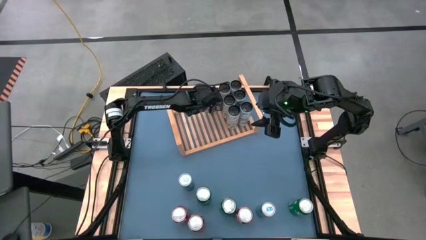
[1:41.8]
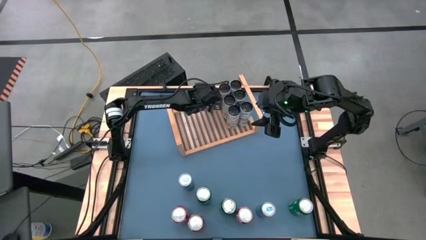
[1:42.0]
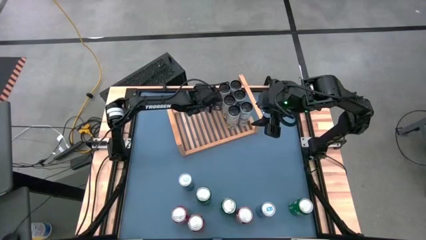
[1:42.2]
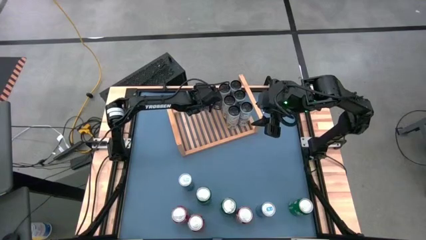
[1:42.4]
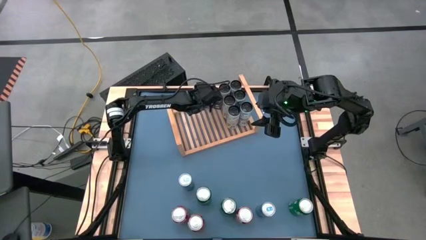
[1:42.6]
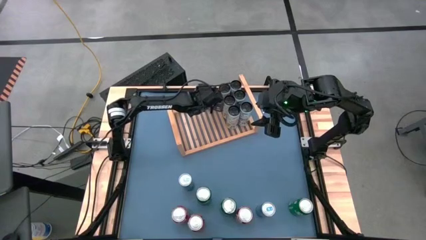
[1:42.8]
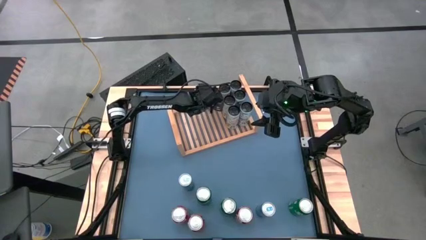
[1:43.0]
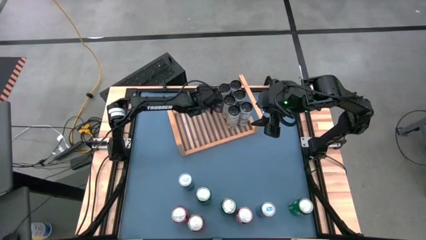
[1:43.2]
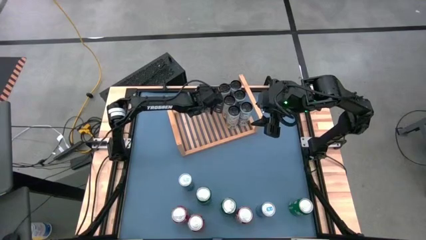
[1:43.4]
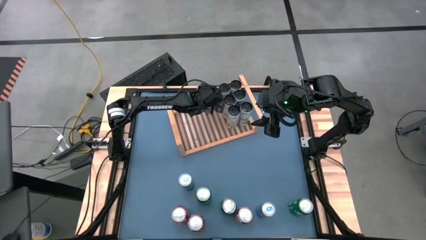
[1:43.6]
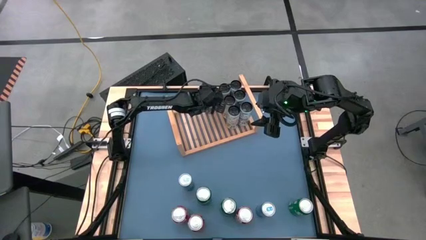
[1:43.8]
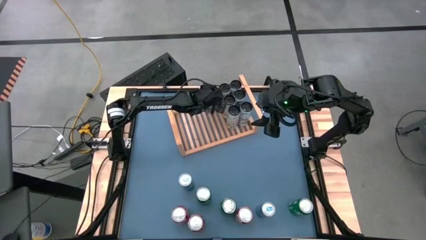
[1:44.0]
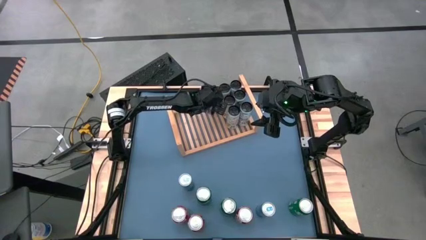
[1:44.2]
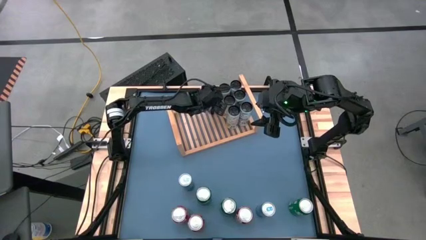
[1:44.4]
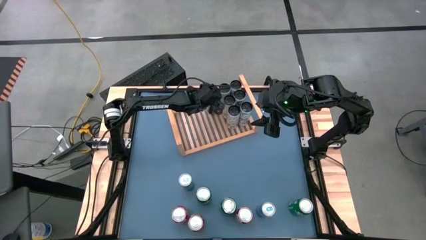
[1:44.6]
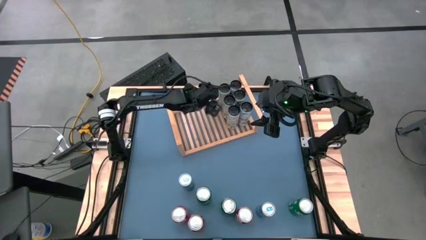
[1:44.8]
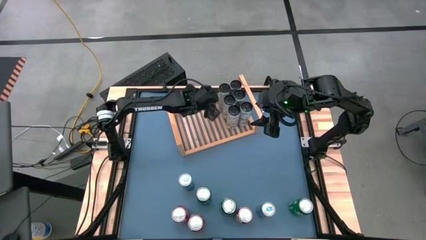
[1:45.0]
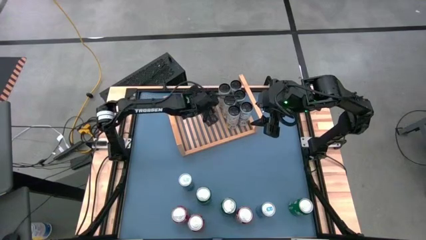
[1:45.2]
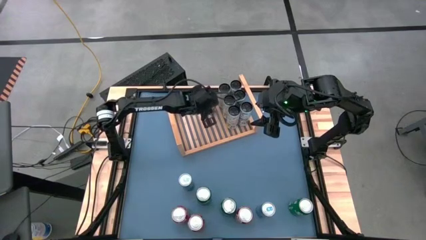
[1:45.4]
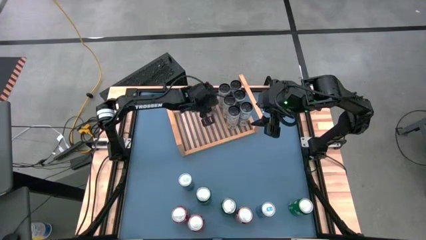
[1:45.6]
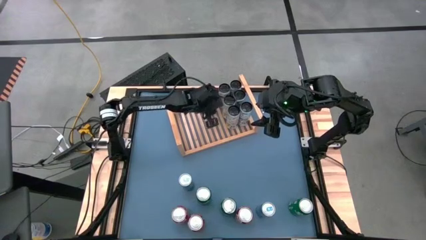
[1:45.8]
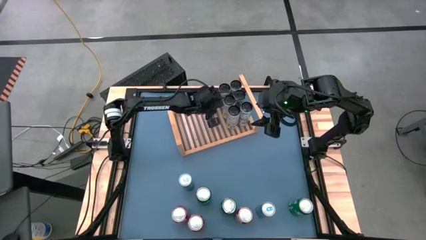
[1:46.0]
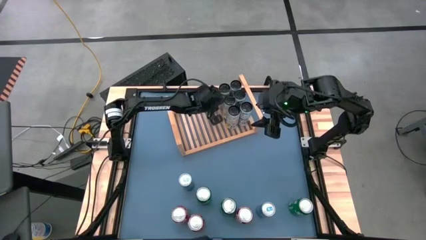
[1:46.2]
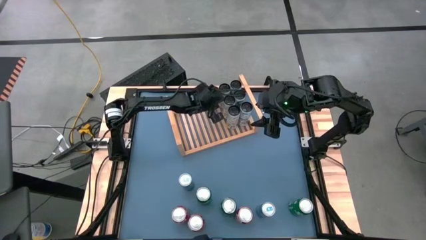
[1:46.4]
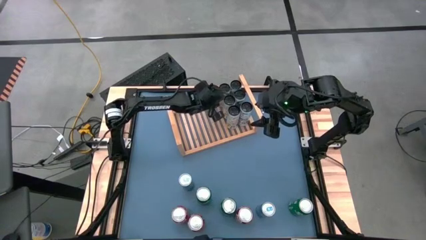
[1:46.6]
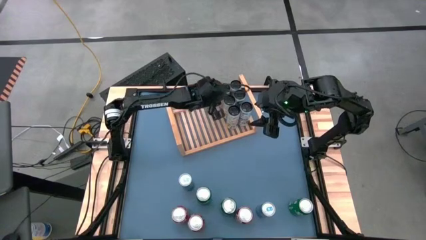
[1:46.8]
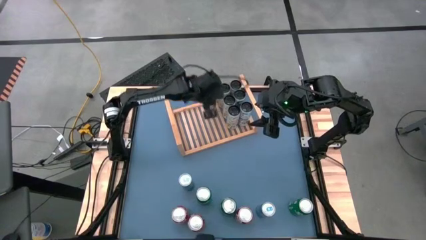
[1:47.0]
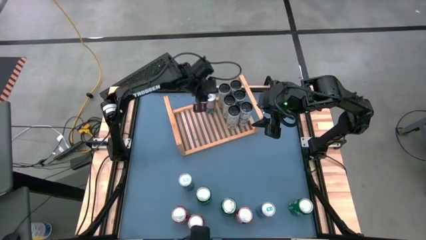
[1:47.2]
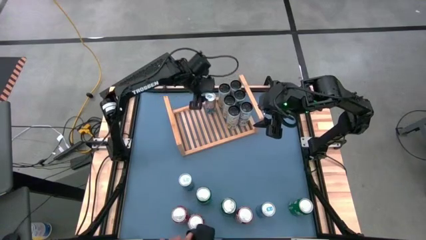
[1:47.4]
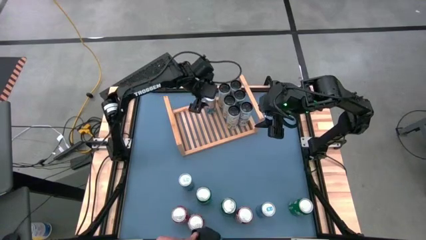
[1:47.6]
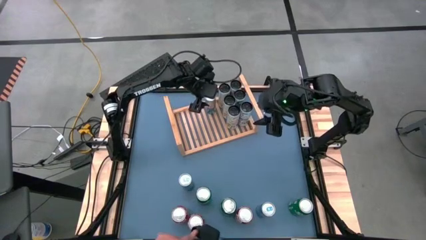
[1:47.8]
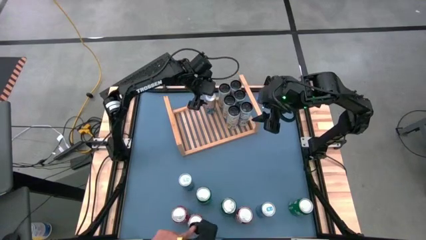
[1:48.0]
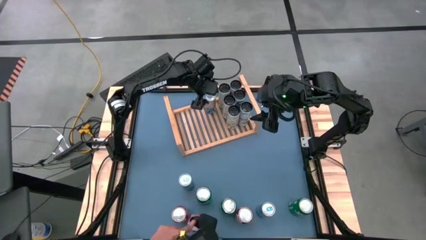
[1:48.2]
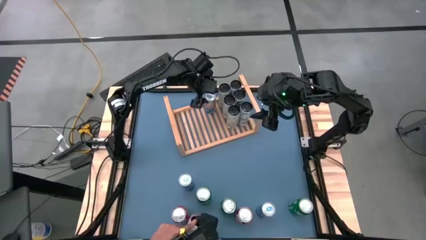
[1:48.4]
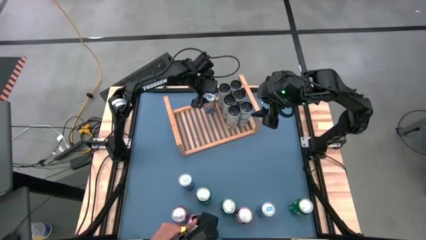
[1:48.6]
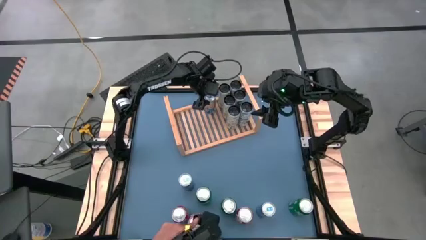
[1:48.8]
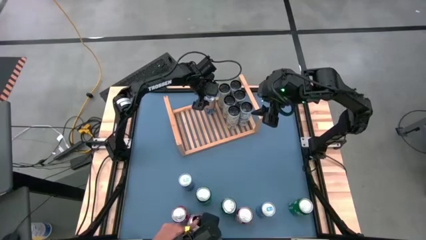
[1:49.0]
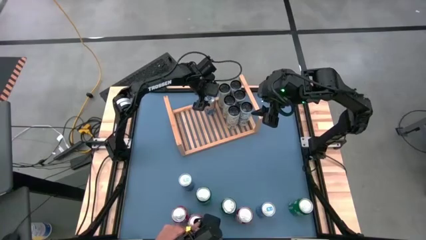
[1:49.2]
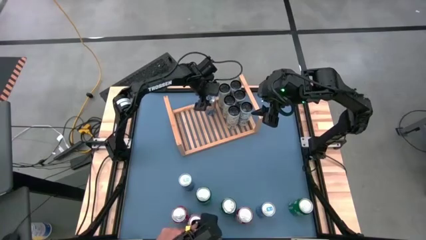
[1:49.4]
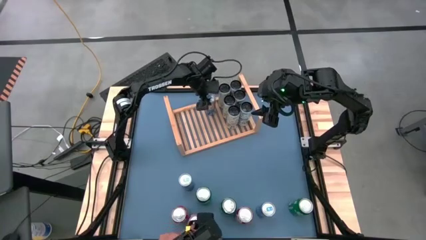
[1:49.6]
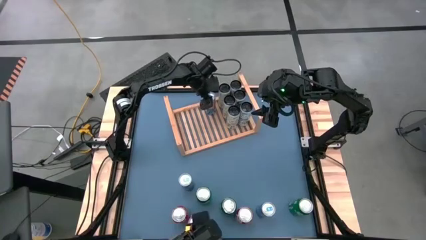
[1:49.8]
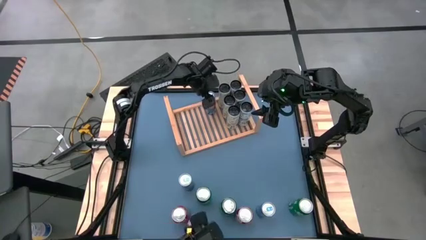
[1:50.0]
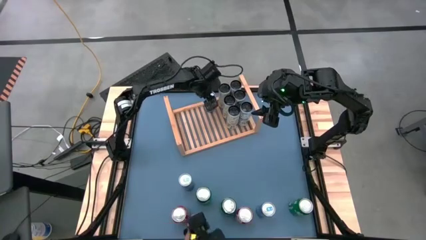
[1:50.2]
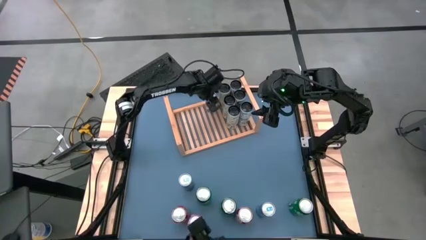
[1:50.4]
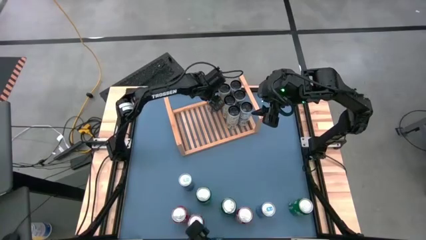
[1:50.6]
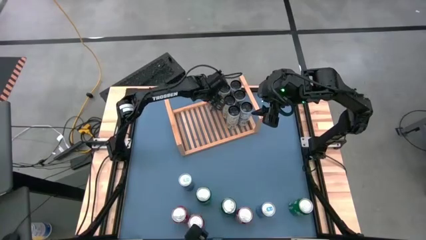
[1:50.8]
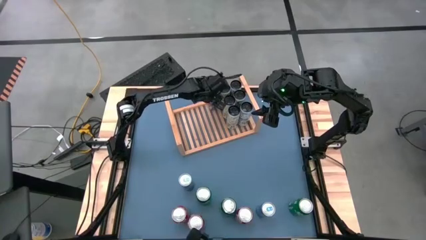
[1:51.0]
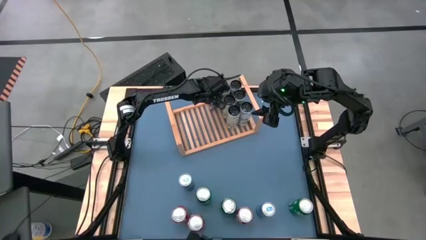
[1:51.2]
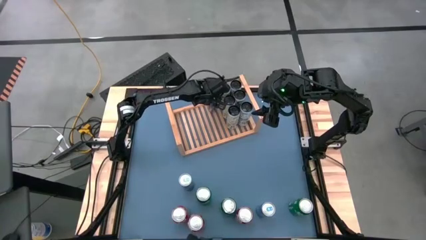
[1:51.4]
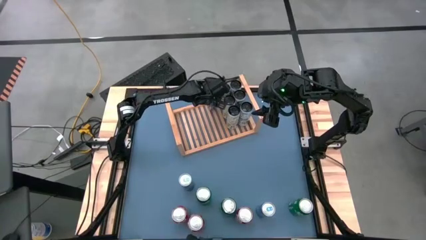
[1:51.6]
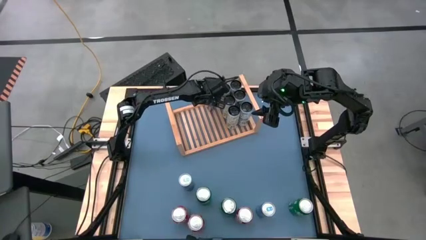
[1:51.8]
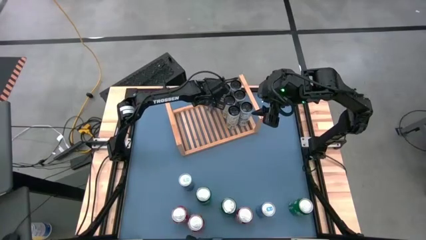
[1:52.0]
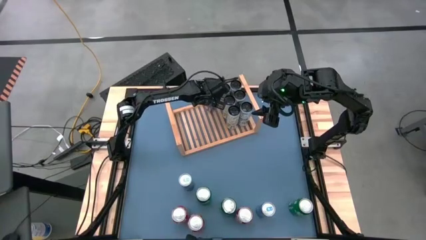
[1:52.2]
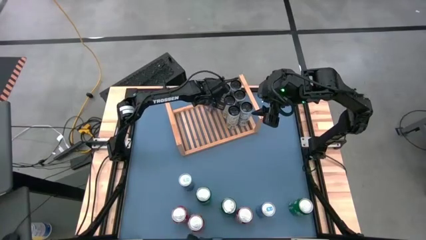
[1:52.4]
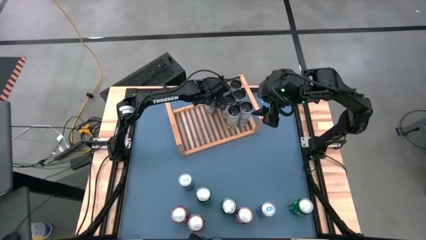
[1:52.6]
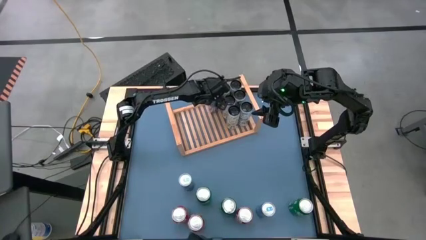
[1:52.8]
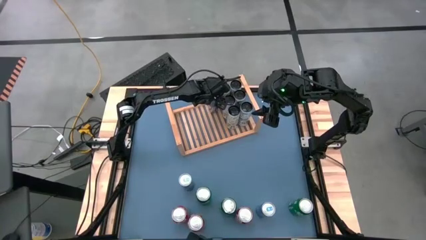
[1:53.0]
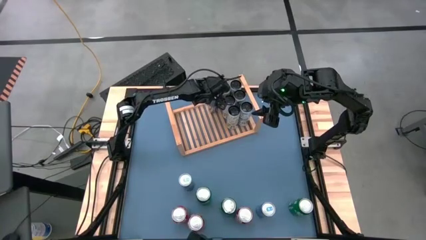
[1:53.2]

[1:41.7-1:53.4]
Task: Place canned beverage on shelf
Put the blue soda can on the shelf
